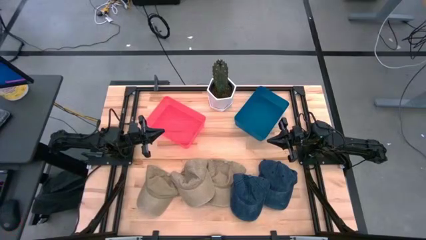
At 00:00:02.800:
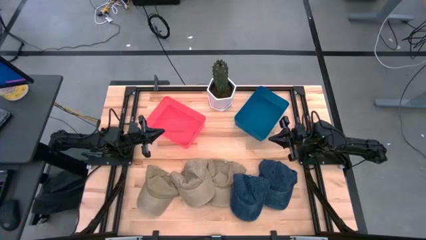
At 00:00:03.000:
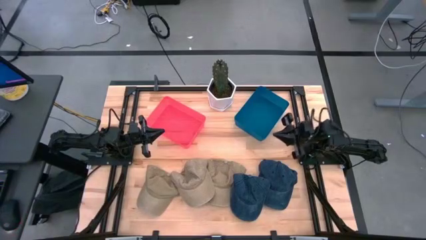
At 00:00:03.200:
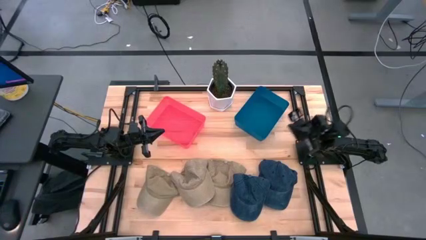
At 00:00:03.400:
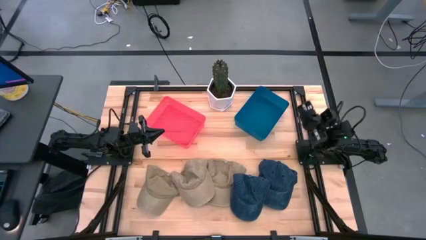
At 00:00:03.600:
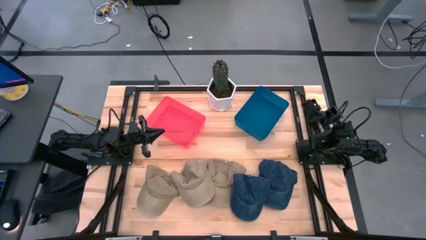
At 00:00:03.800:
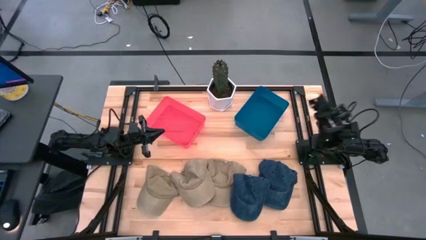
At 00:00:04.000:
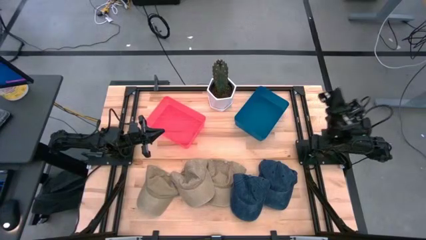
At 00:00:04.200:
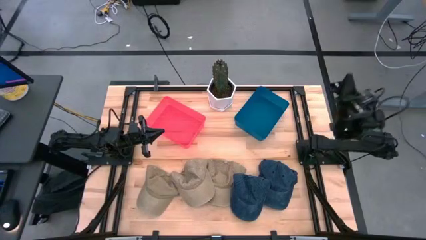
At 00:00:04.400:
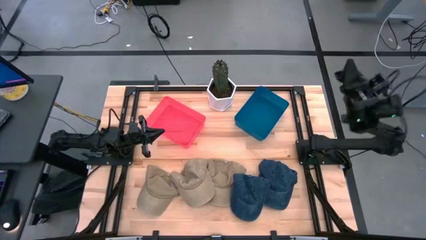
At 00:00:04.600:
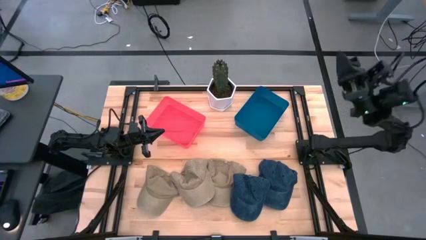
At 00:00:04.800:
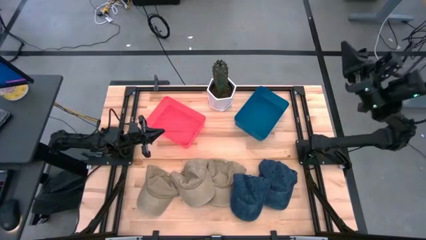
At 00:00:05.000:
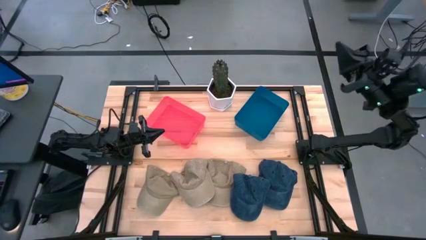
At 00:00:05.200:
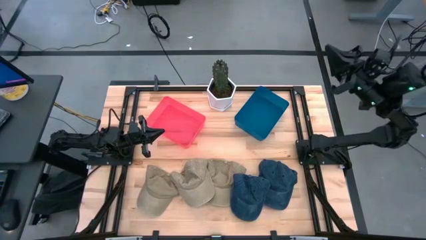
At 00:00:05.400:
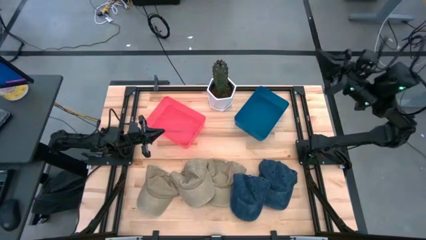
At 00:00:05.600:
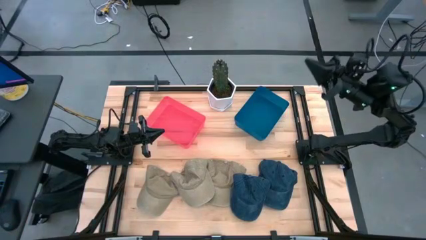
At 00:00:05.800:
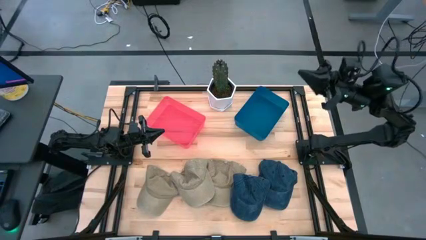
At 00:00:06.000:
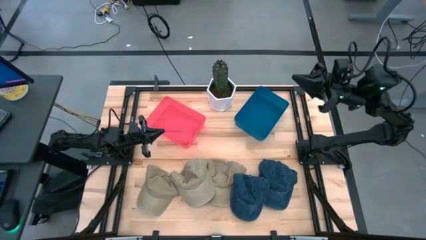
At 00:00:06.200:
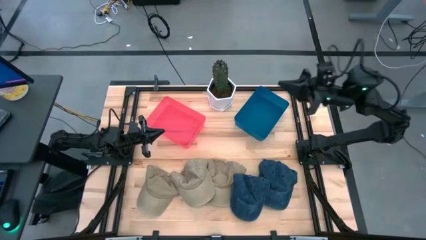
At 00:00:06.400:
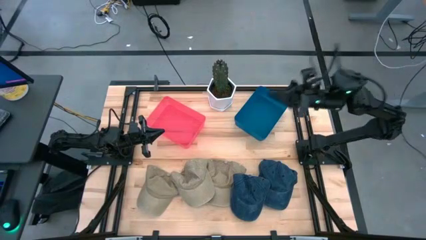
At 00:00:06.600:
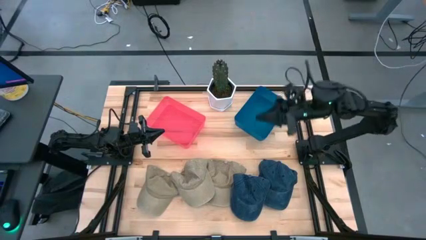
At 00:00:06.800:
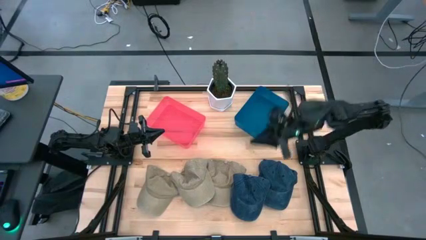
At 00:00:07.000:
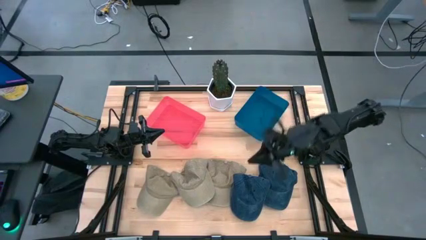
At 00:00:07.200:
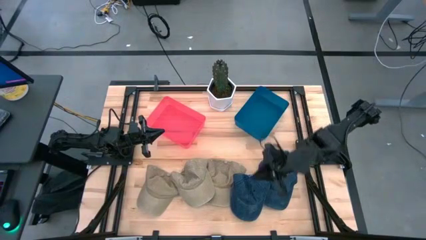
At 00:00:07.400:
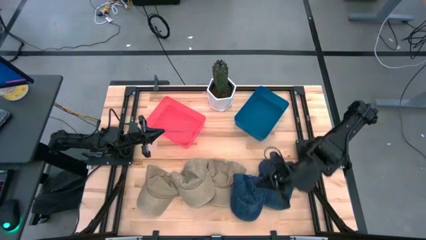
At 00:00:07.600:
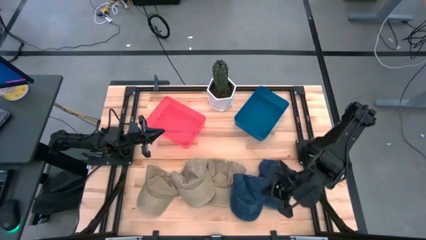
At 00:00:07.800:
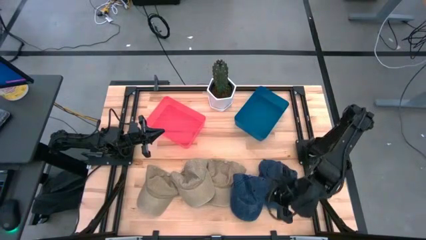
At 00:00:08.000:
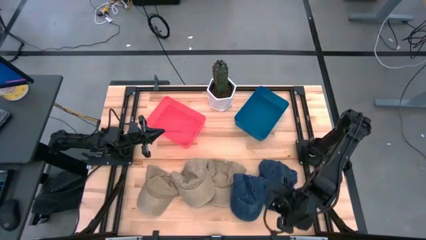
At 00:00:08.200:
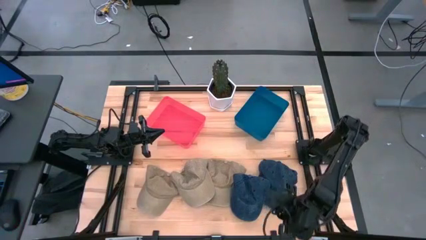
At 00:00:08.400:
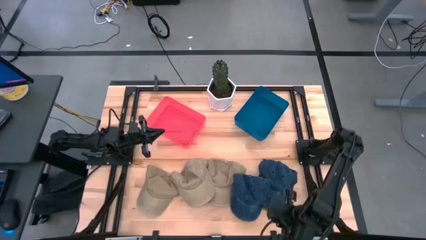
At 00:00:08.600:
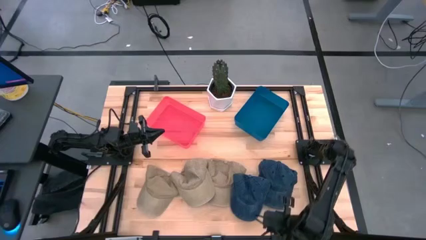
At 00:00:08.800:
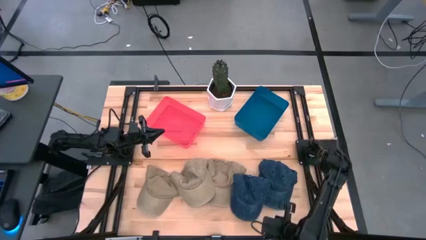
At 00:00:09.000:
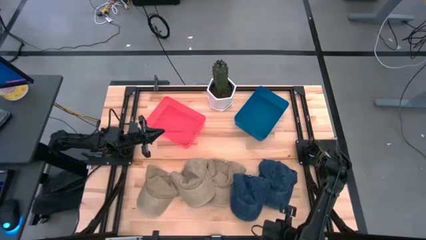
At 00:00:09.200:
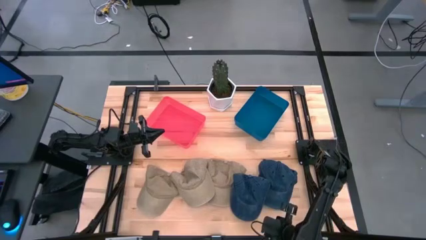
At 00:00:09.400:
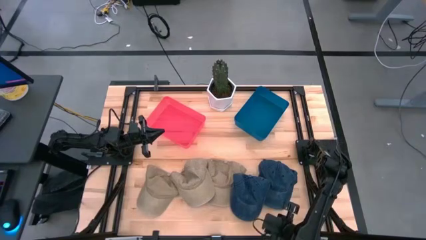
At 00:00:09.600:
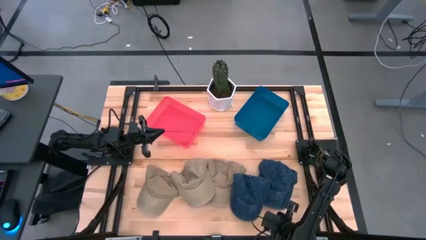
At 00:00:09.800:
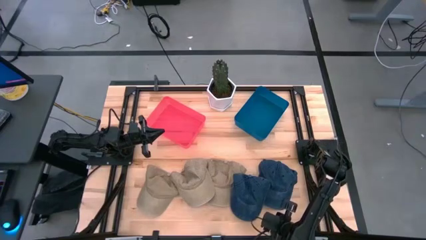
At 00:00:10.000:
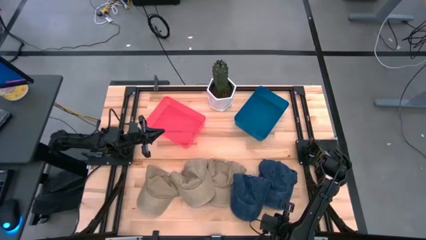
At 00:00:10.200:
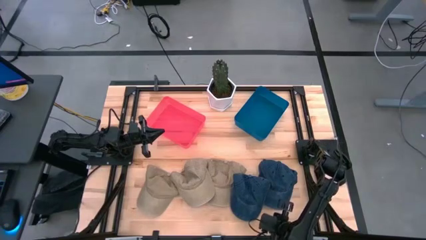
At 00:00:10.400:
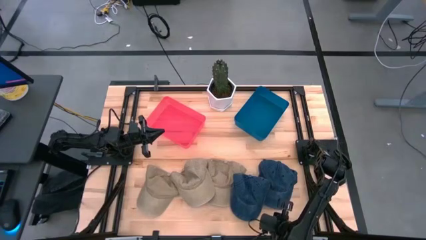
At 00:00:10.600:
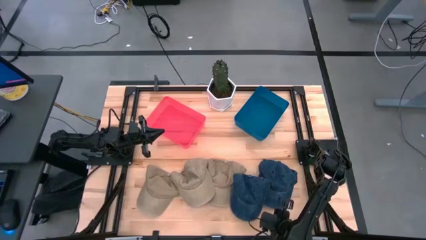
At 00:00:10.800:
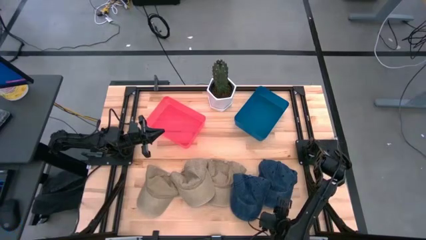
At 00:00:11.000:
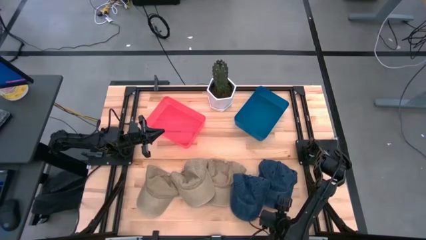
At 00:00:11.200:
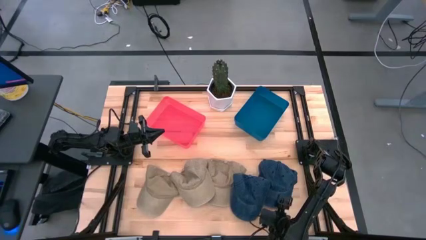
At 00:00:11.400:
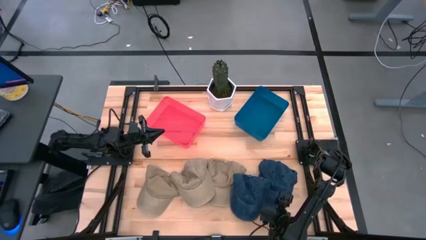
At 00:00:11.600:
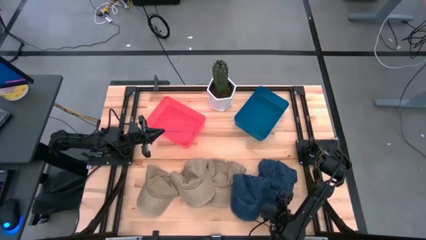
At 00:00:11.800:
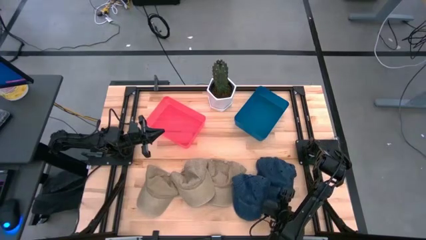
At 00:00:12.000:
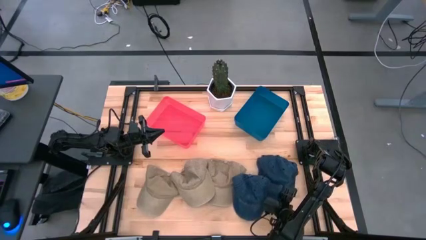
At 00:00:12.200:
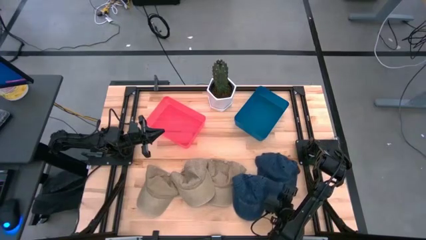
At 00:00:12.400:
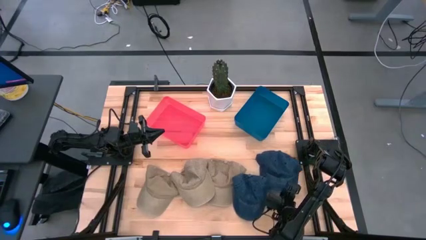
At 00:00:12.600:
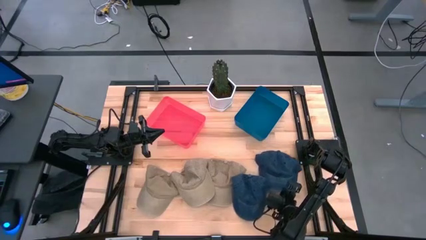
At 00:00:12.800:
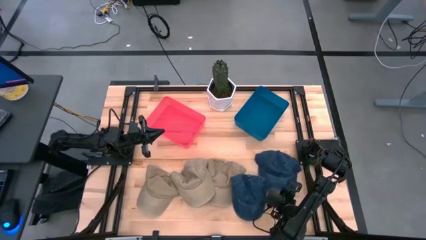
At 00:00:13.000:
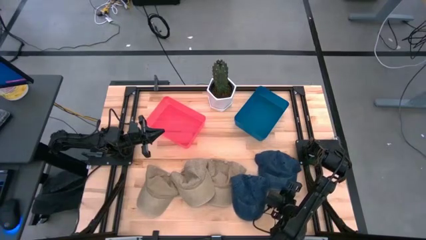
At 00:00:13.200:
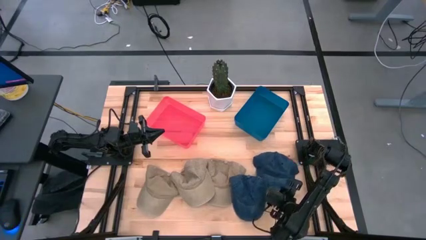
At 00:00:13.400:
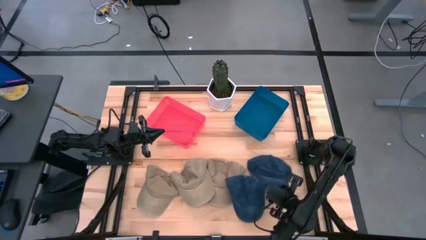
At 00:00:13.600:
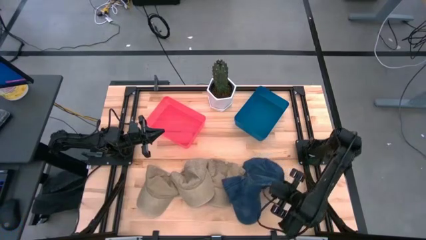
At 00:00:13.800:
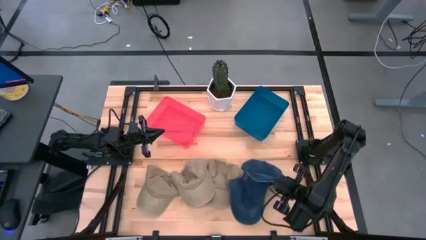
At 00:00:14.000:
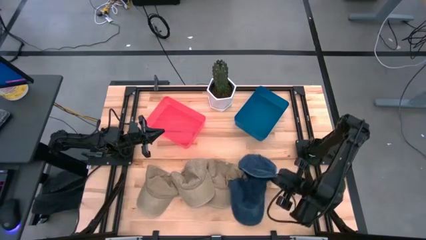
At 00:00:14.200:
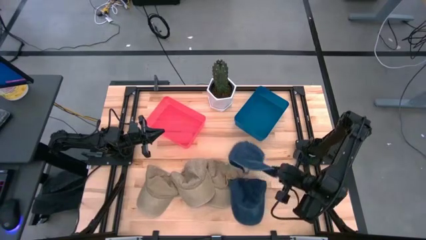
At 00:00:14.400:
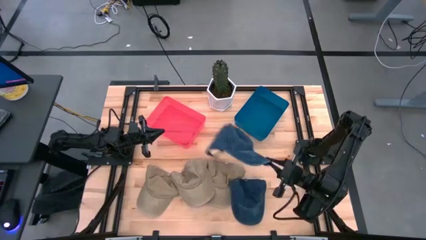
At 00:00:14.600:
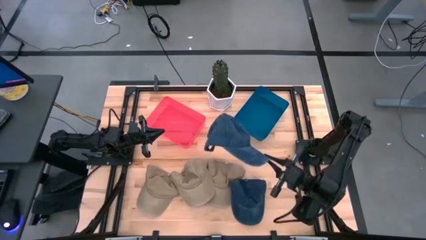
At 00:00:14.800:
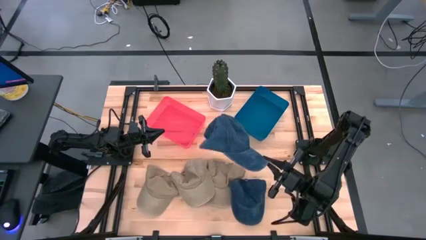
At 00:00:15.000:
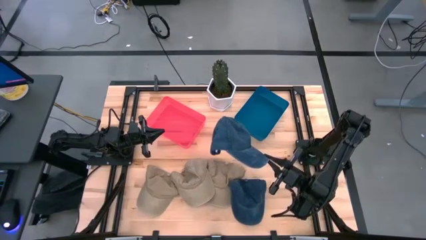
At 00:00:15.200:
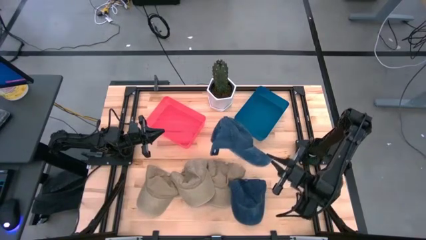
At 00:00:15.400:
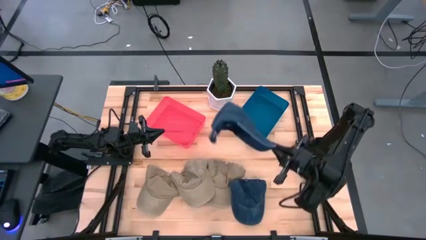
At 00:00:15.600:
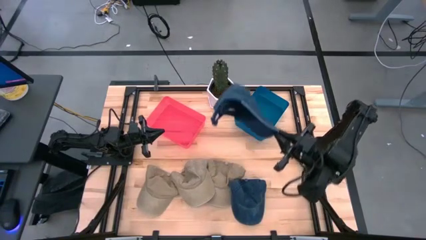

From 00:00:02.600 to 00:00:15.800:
Task: Pick & Place hat
Put the right blue cap into the blue bin
